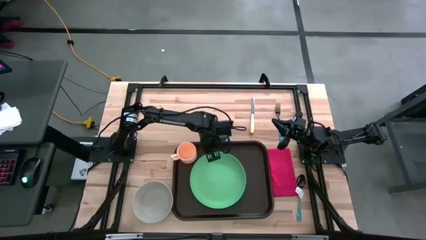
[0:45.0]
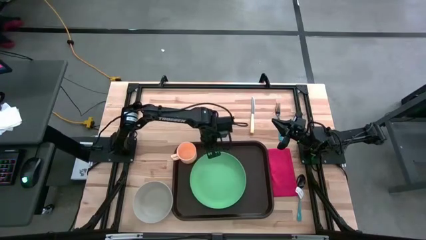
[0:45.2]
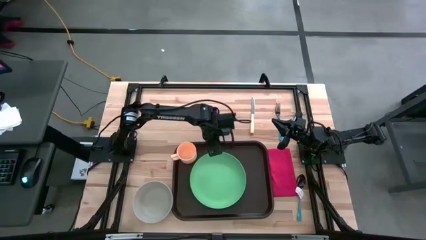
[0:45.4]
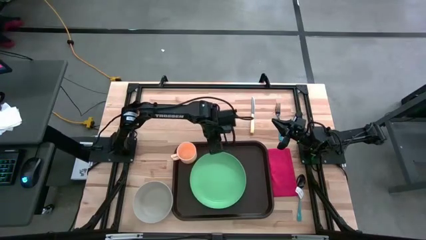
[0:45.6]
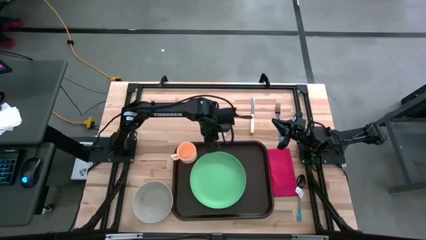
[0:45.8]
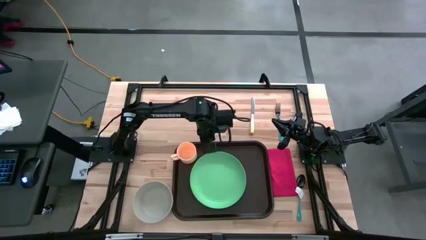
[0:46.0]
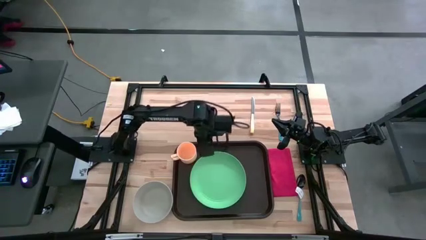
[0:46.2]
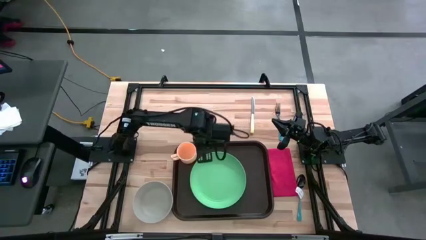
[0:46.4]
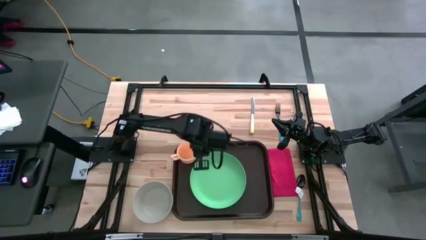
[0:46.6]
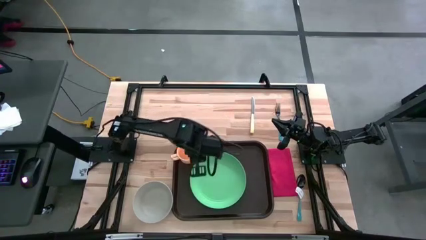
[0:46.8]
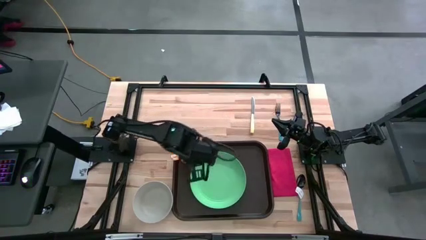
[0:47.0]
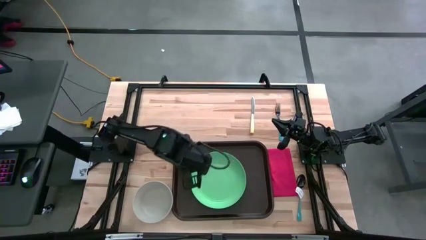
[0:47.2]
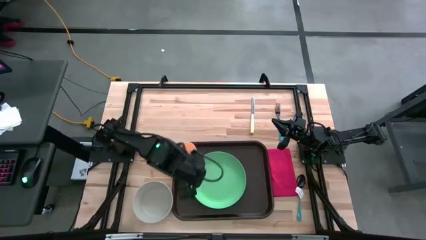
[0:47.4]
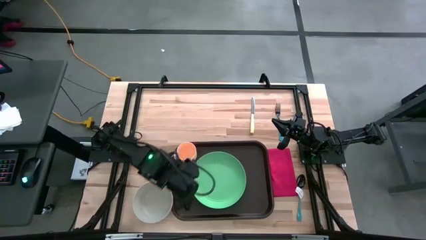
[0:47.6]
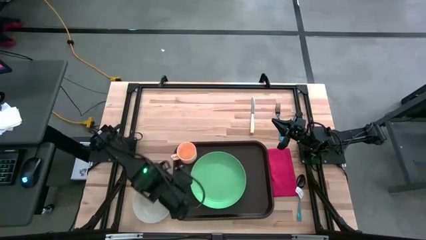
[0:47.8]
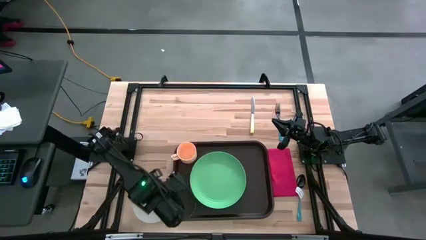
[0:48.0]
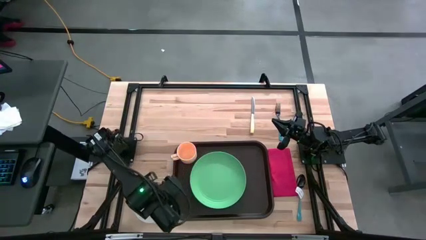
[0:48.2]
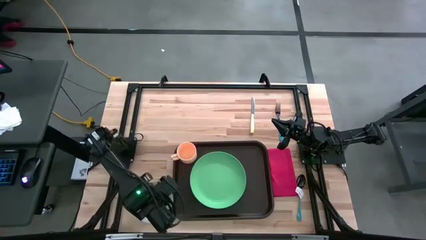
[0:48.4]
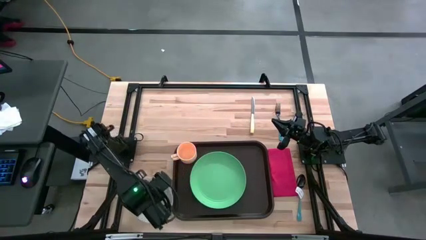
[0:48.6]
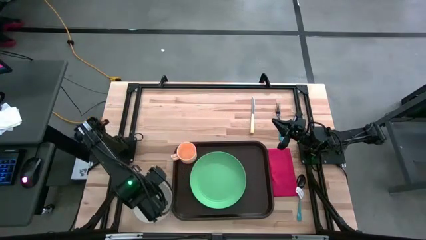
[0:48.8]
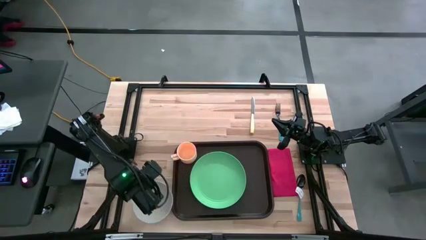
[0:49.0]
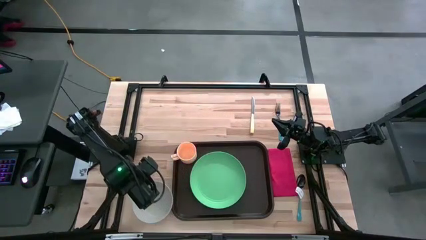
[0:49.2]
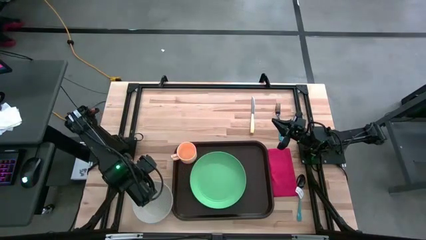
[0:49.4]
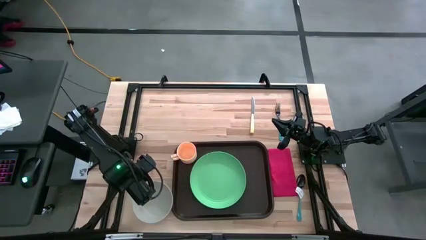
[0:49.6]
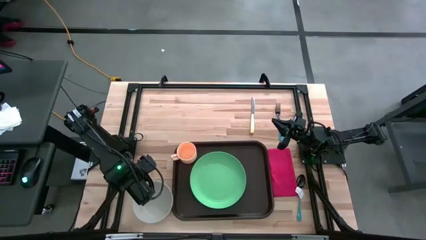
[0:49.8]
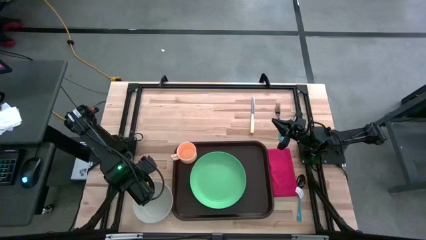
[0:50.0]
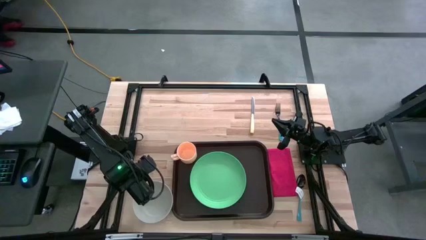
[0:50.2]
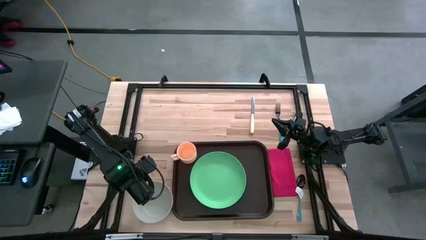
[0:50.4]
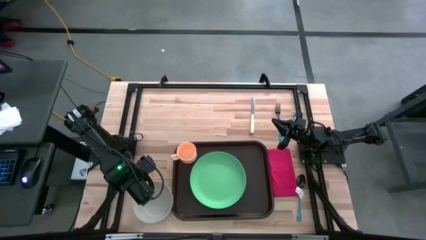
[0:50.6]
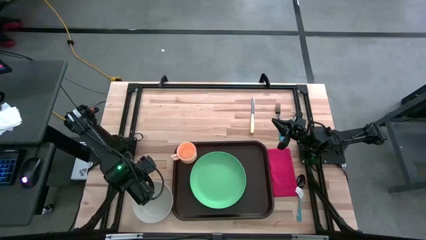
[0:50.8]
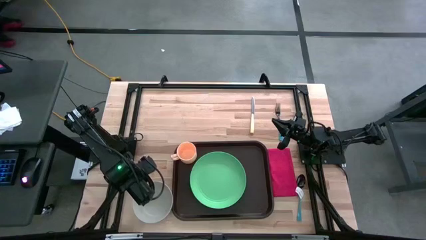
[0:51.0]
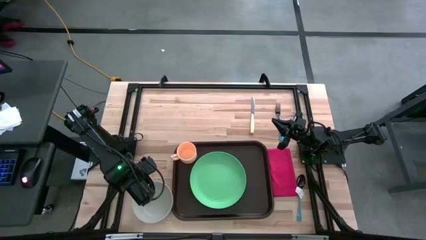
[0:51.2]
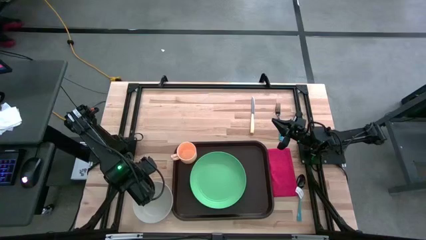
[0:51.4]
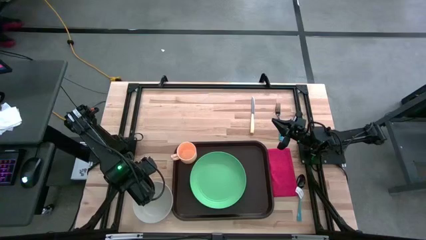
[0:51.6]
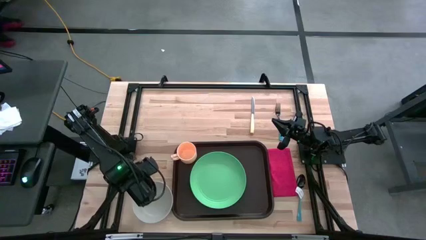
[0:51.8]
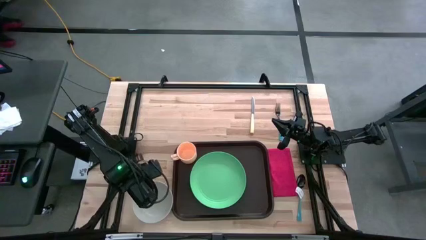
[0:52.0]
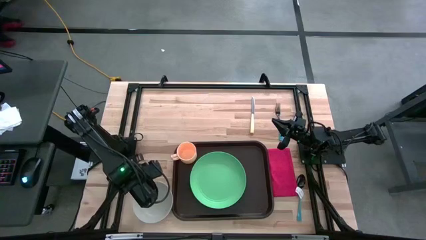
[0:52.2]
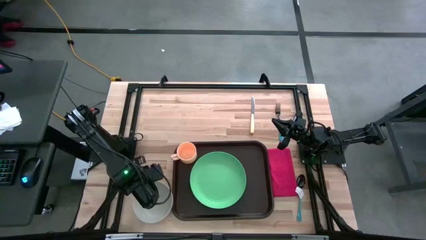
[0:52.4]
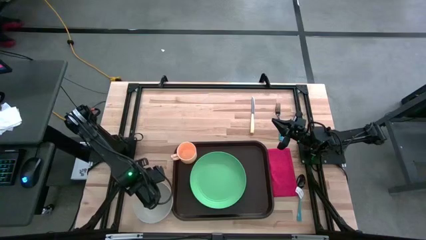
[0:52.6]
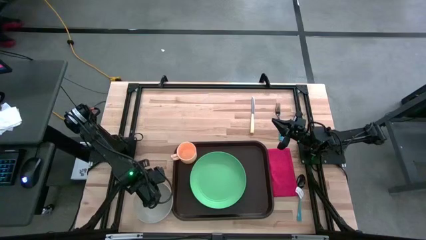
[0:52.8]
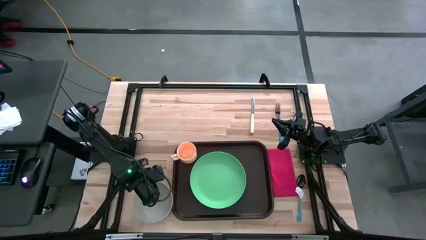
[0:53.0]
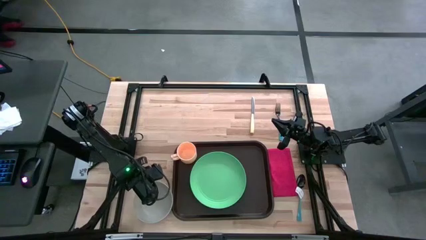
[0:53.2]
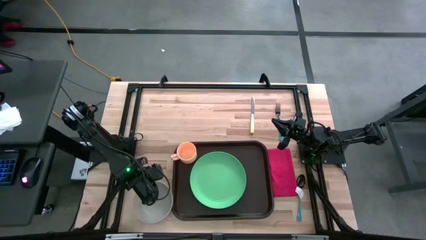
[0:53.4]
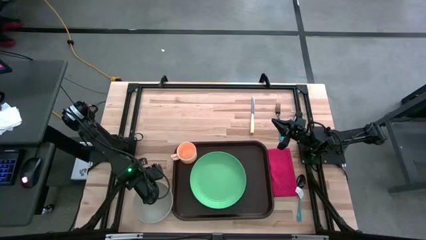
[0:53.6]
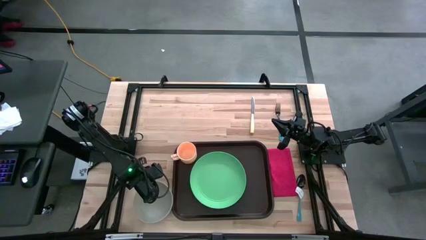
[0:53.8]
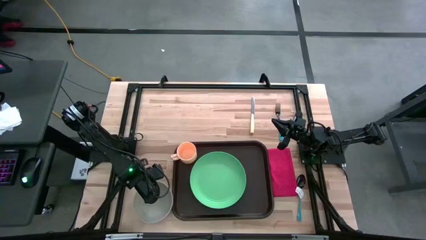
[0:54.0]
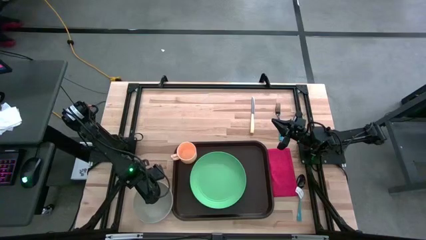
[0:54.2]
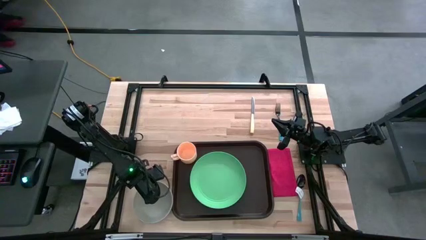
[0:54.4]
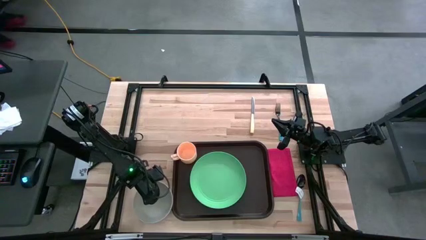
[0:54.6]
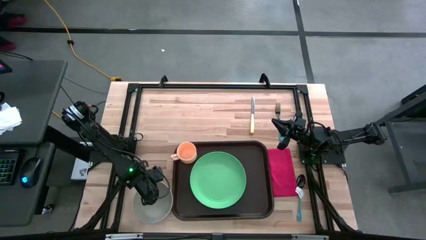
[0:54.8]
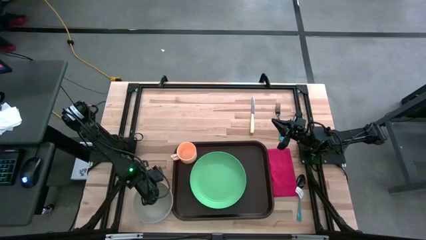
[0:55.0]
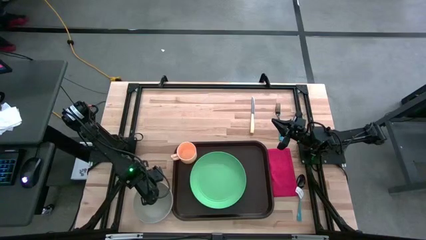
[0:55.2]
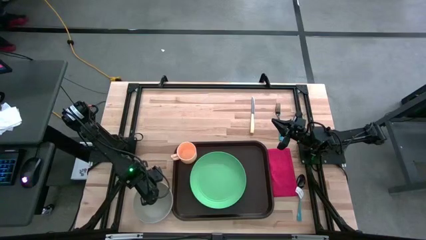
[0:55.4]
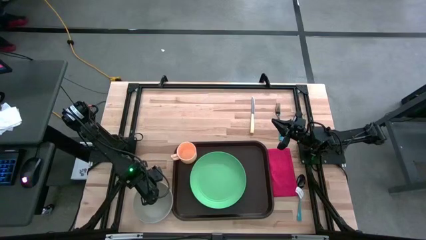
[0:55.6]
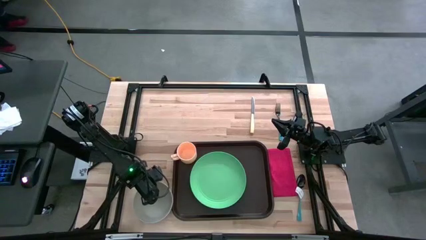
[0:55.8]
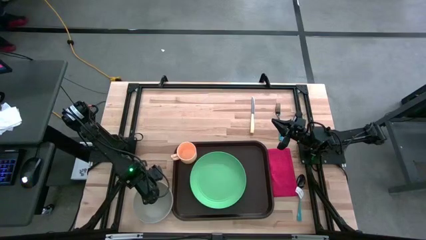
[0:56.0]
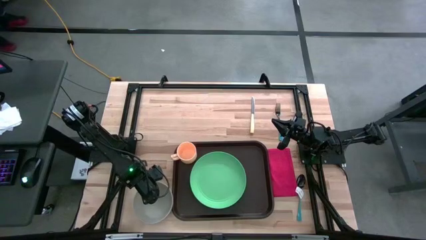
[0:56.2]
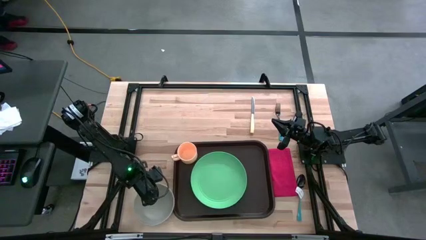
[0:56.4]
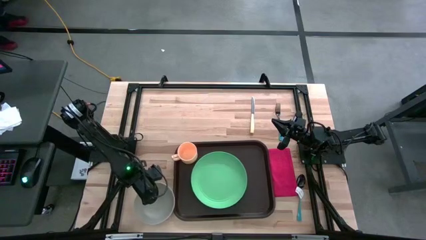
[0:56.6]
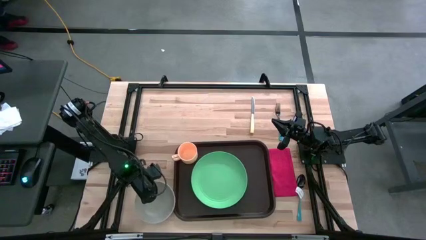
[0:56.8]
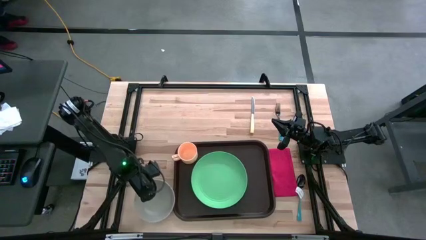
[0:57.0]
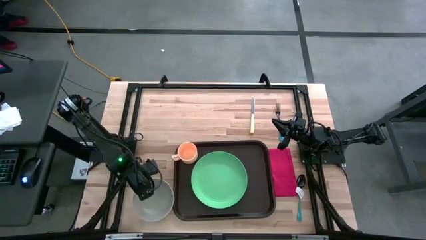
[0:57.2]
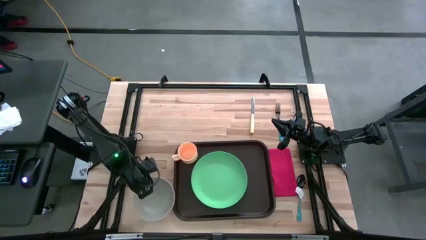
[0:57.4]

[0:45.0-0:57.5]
Task: Set up tray
Put the white bowl on the green plate on the brown serving tray

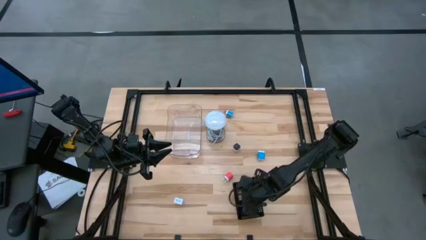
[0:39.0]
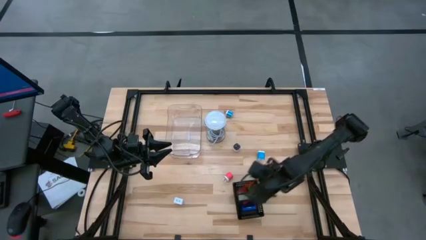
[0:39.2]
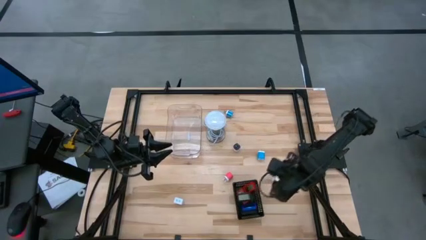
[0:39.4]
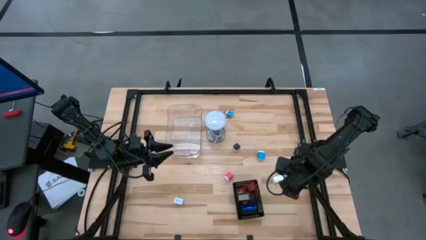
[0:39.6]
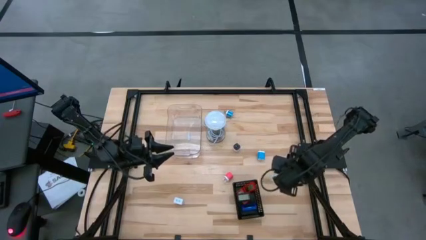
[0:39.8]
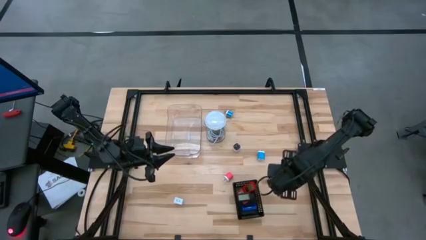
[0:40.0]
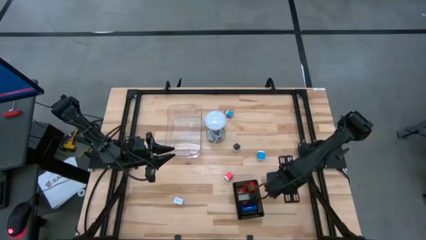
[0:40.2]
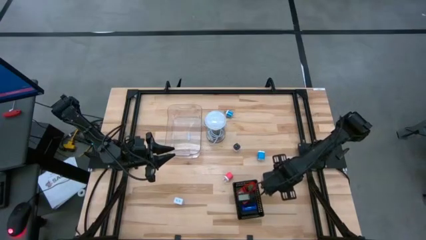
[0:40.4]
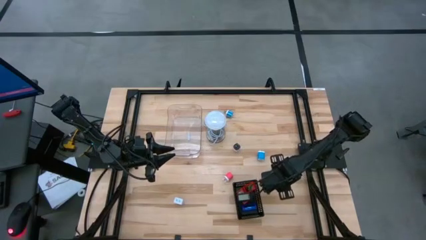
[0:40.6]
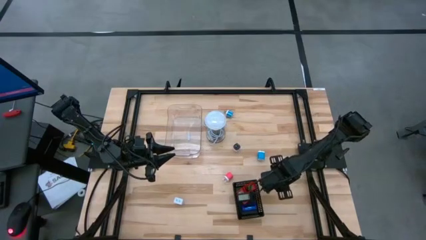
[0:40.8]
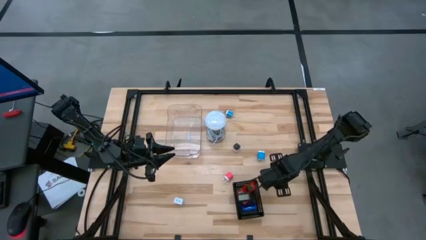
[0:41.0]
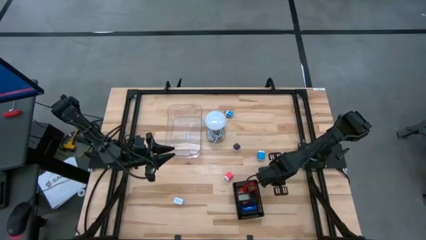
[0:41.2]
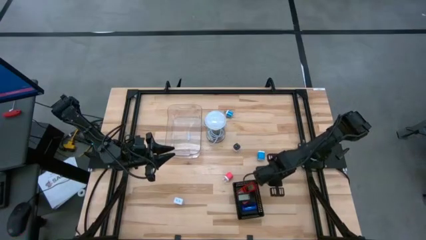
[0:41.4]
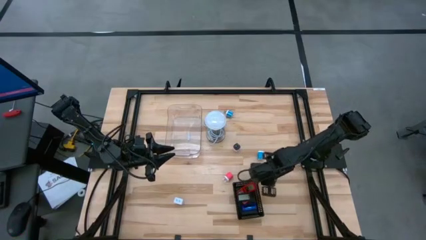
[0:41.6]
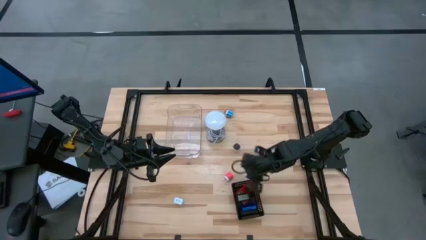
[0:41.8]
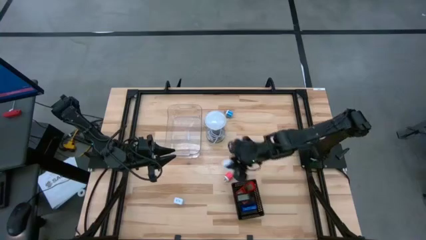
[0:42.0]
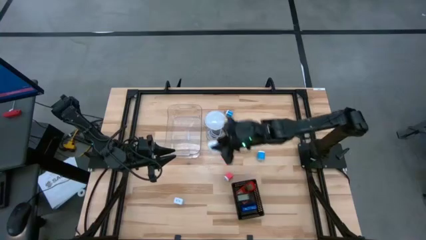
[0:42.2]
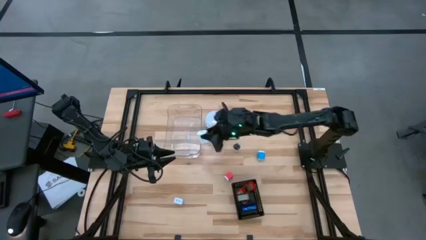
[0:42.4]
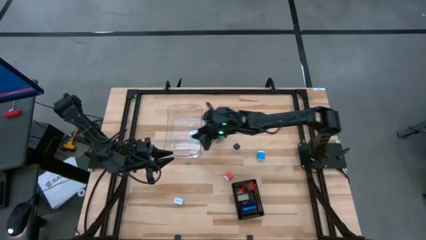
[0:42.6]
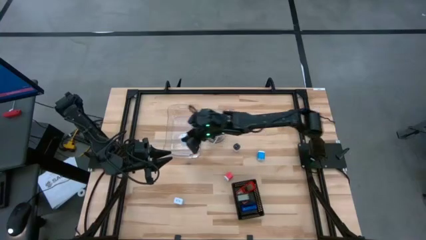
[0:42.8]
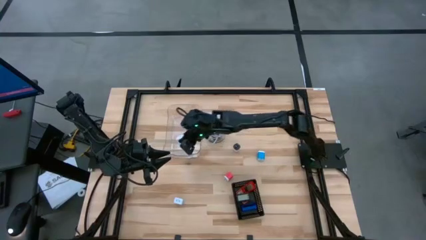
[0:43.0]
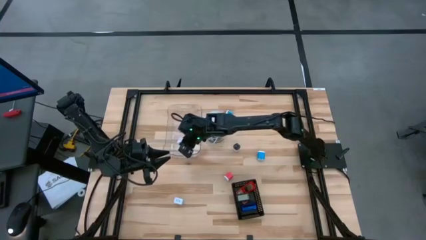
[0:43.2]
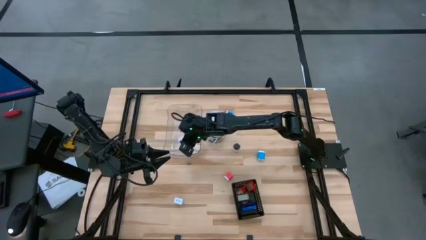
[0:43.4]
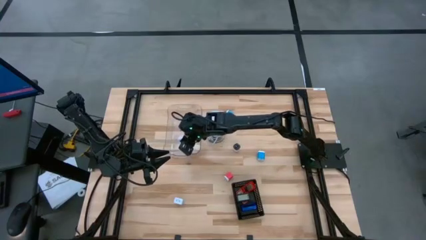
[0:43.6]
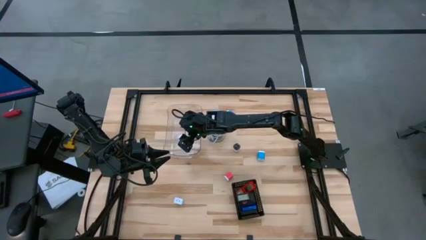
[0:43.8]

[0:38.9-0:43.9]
Task: Pick & Place Office items
Put the right white charger adapter into the transparent bin
